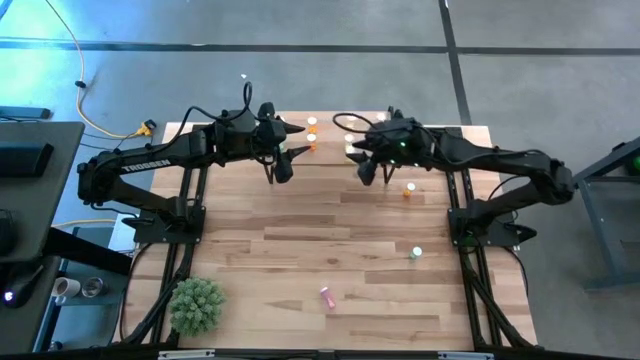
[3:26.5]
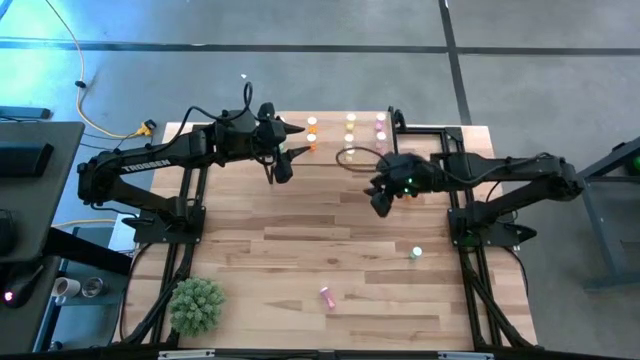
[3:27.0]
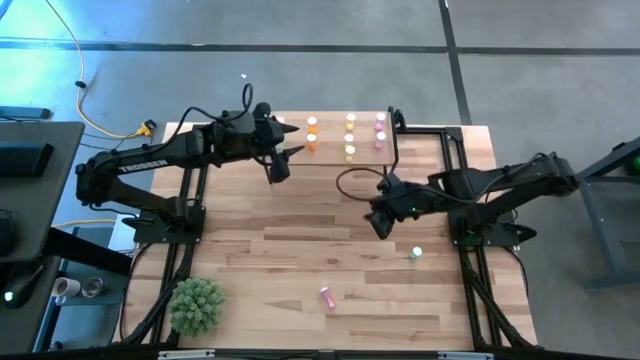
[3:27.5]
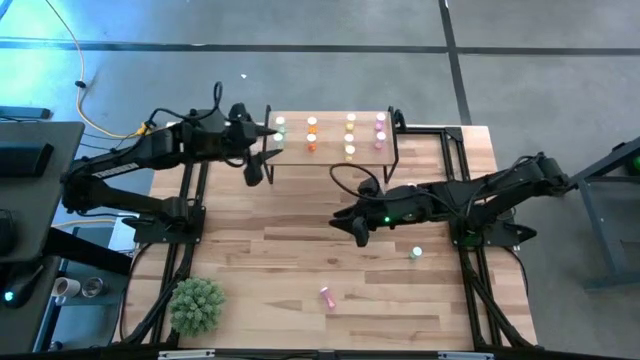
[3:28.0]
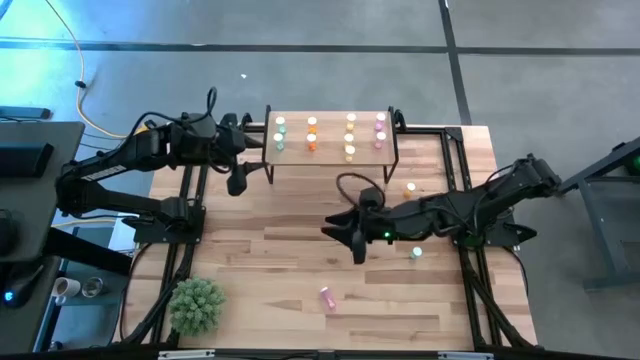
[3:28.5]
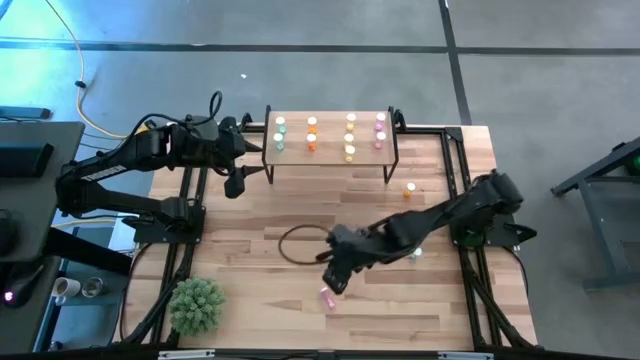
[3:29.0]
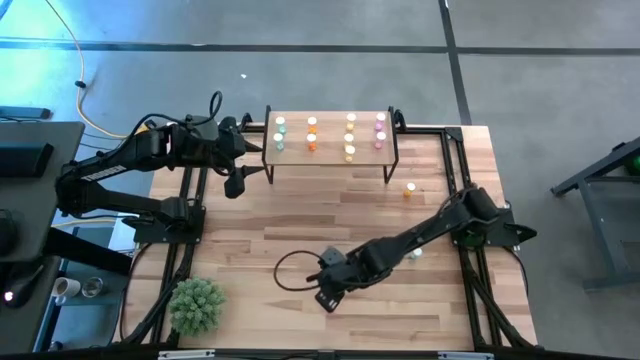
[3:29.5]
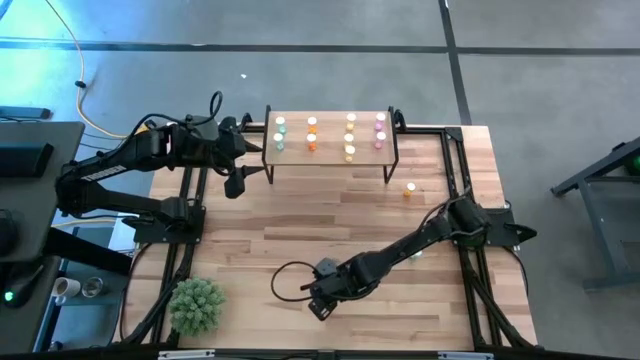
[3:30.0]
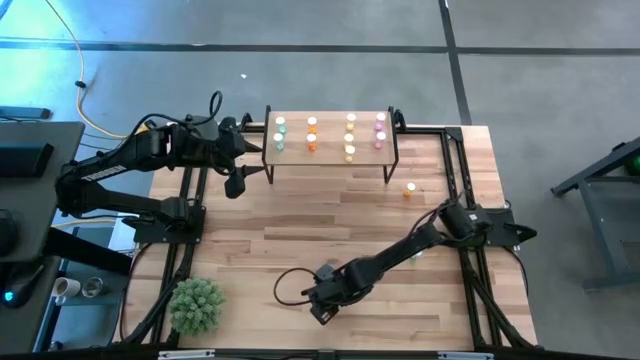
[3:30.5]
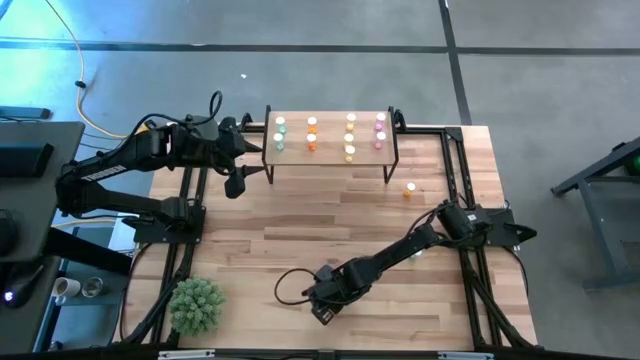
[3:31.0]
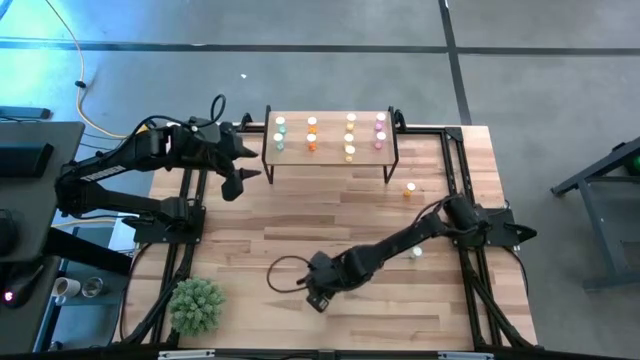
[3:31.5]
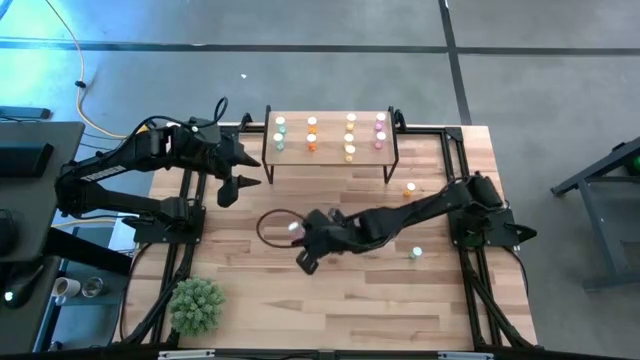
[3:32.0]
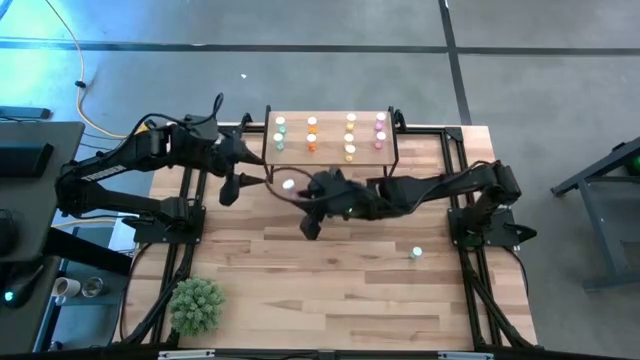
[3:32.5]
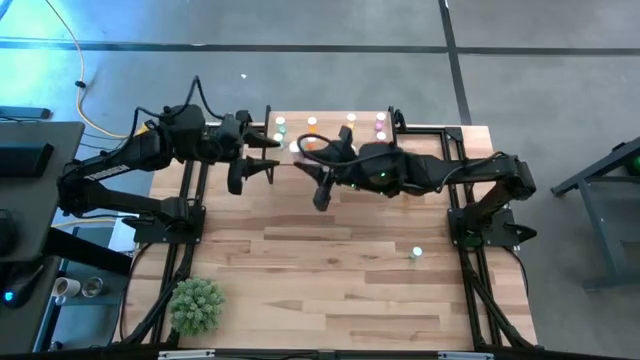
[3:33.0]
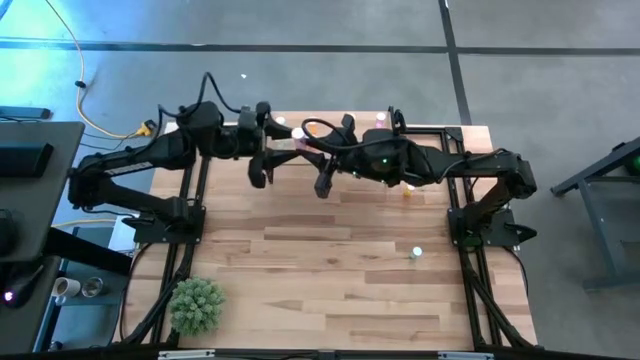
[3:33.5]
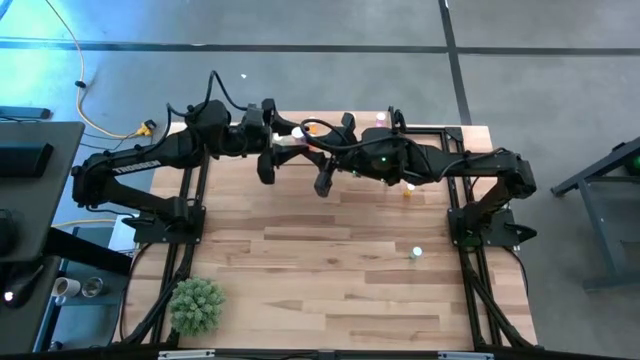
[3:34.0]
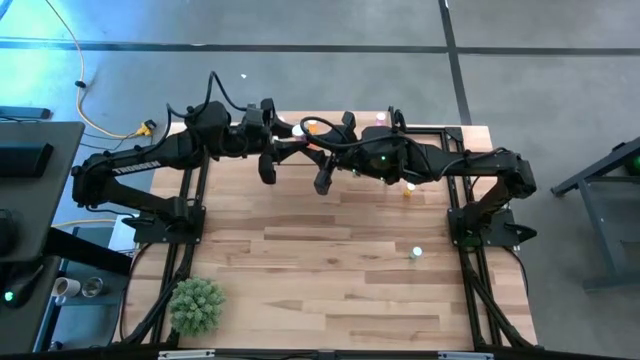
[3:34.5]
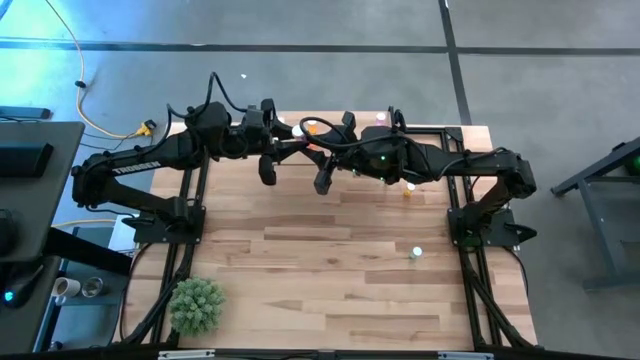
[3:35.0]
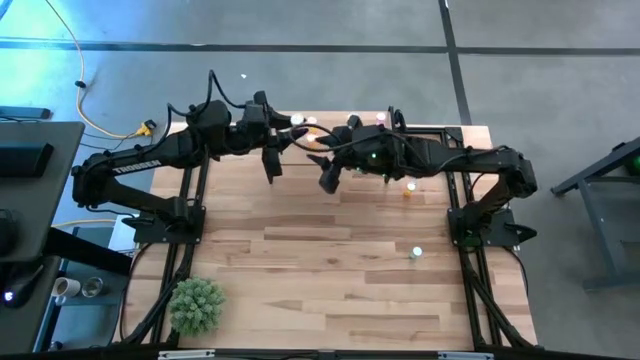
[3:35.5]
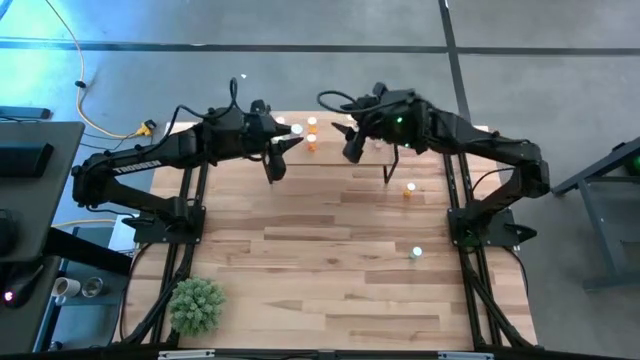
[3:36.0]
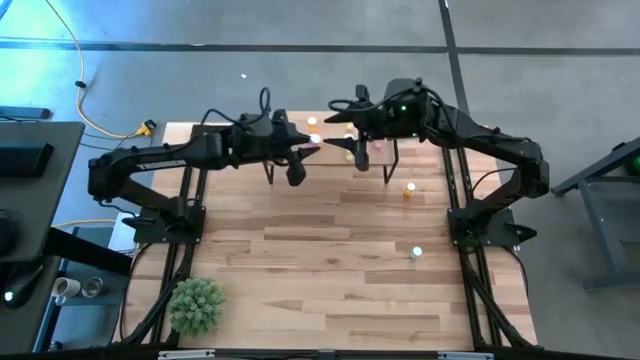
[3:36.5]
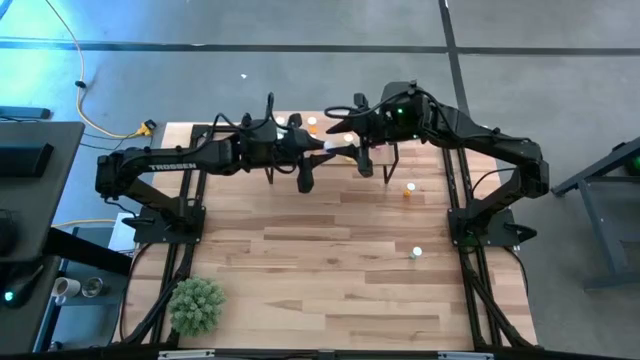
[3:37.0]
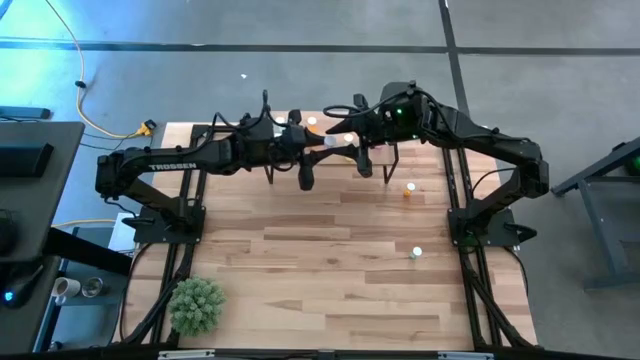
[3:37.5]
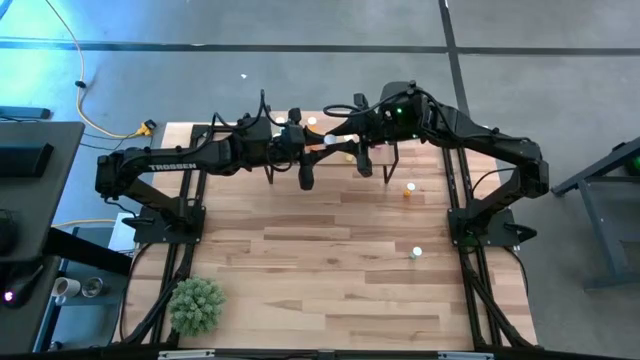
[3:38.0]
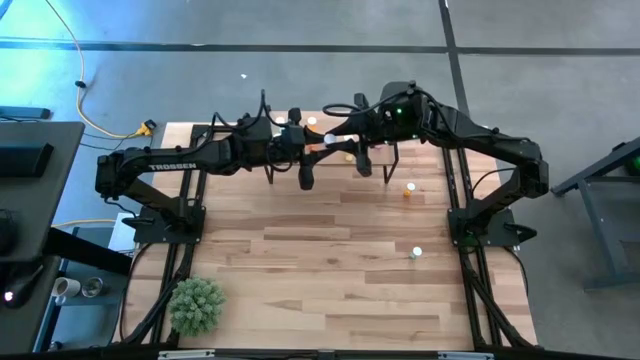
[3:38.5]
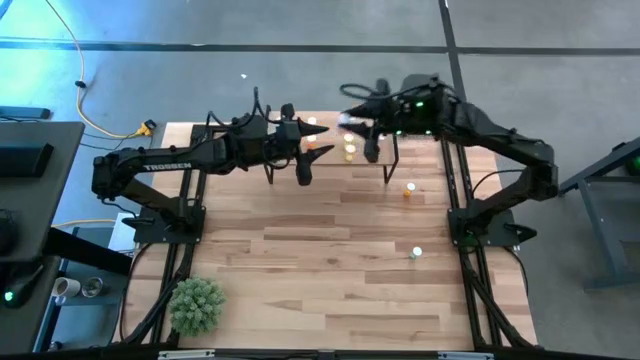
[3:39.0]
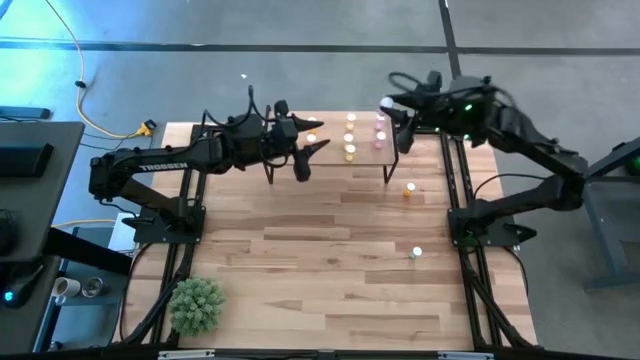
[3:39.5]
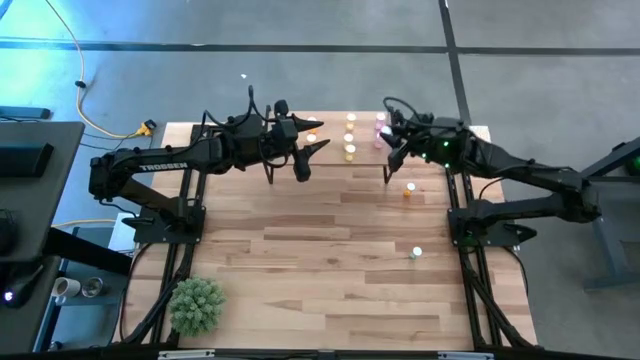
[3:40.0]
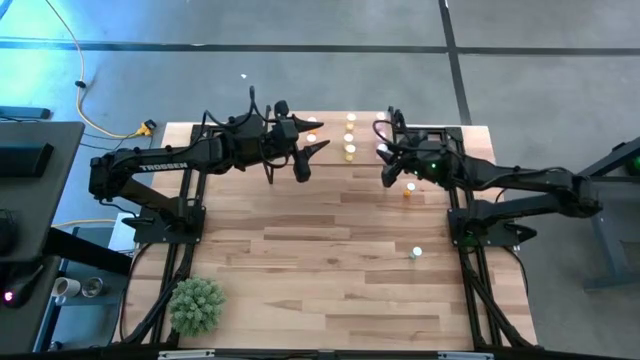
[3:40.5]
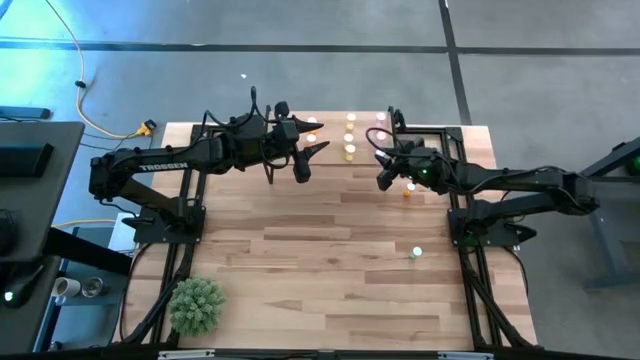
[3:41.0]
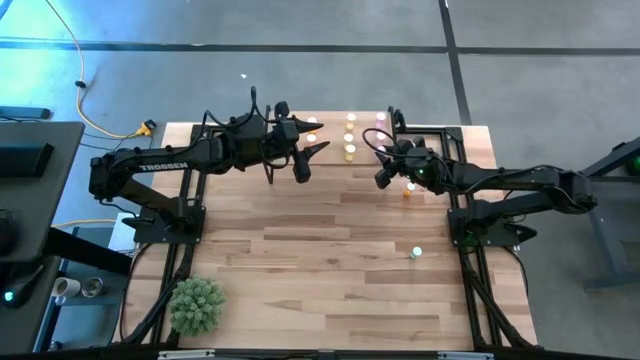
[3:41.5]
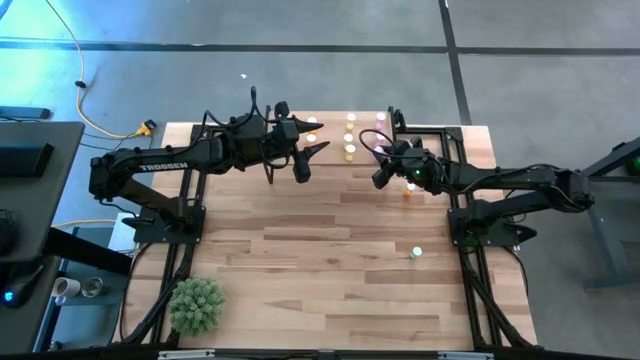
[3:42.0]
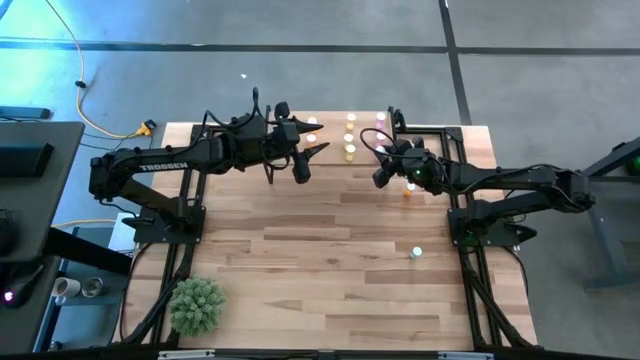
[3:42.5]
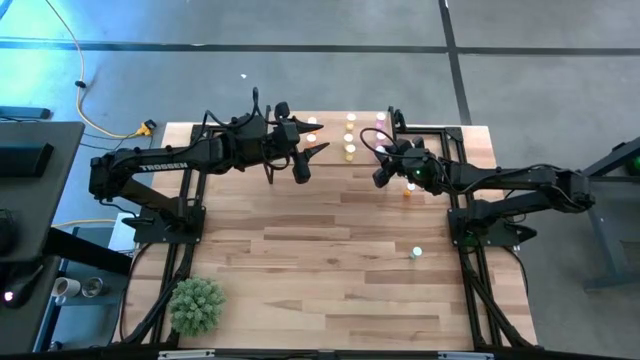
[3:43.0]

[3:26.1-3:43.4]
Task: Pick and place medicine bottles onto shelf by color
Put the violet pill bottle on the shelf aligned with the other violet pill bottles
